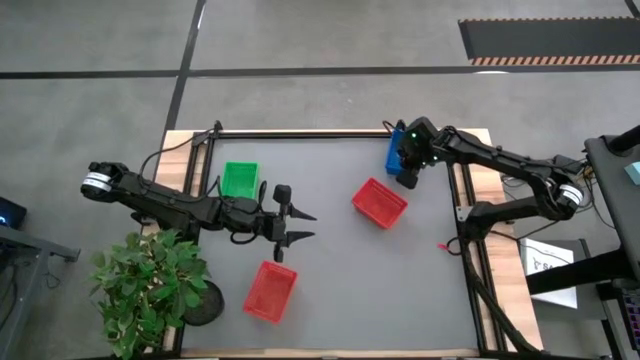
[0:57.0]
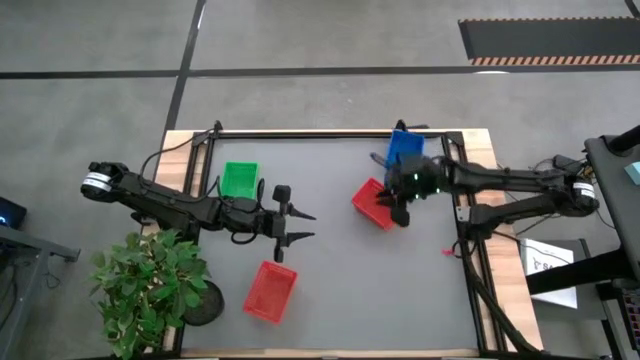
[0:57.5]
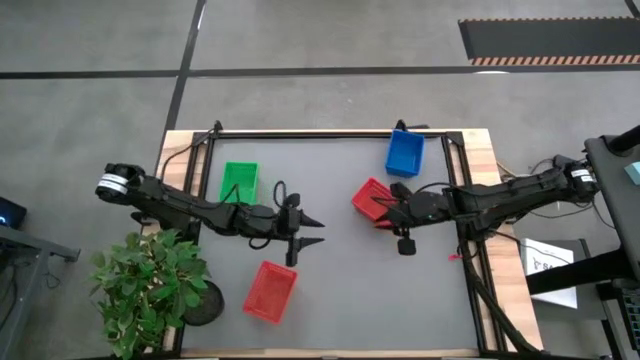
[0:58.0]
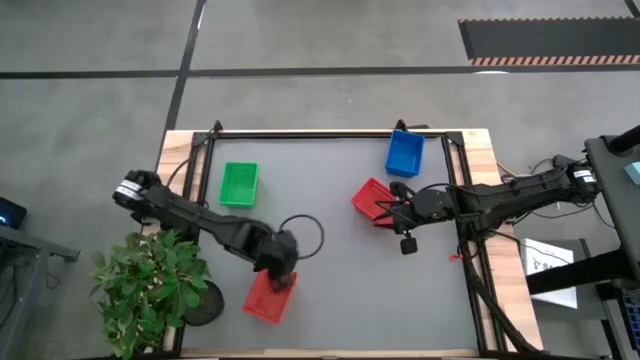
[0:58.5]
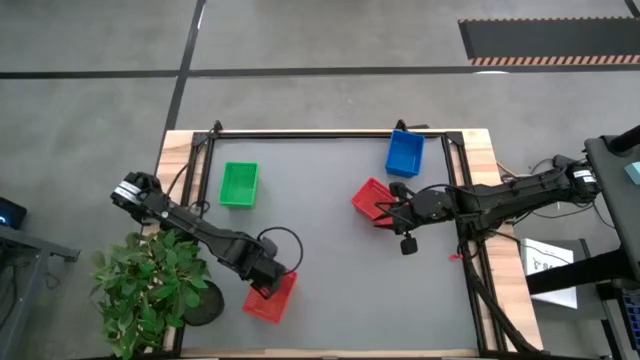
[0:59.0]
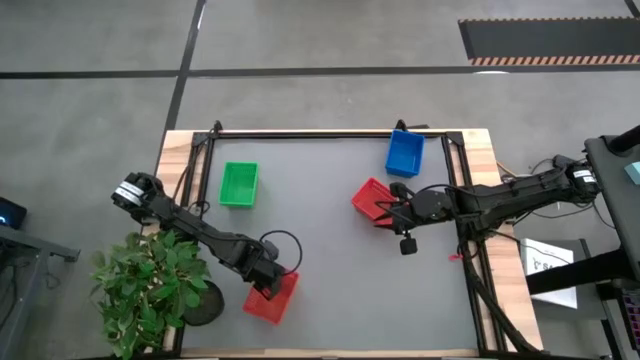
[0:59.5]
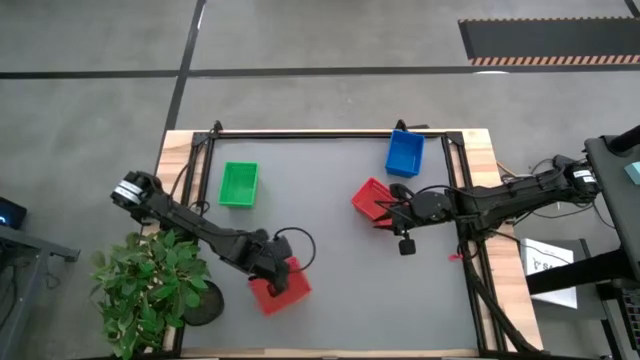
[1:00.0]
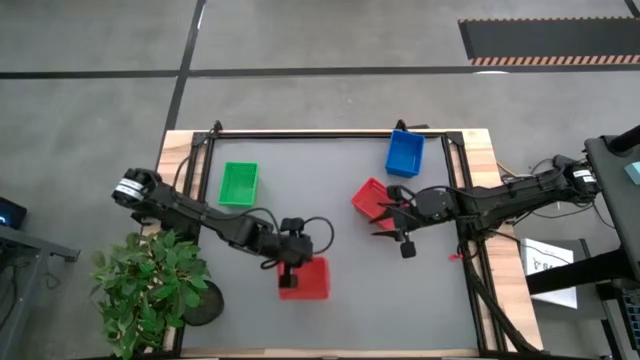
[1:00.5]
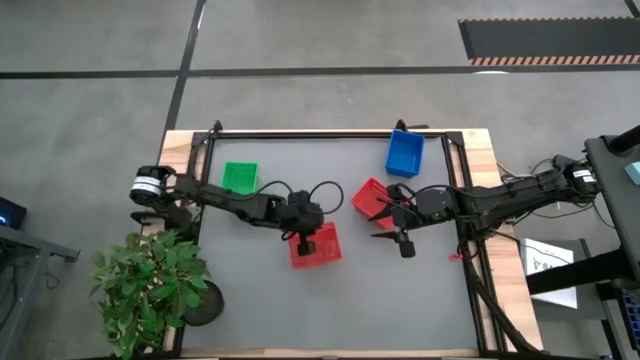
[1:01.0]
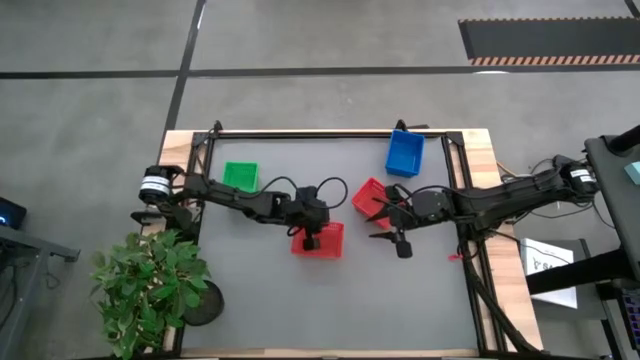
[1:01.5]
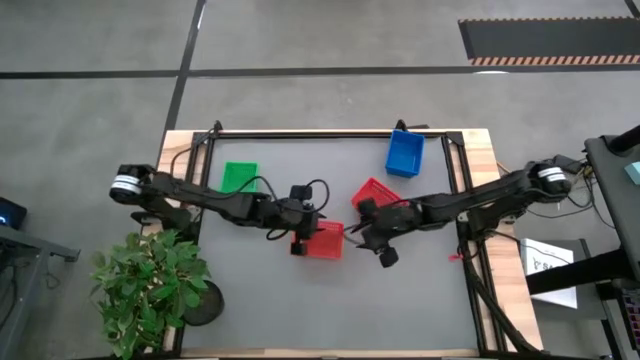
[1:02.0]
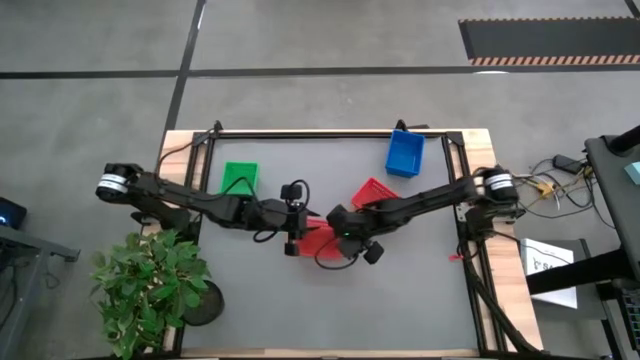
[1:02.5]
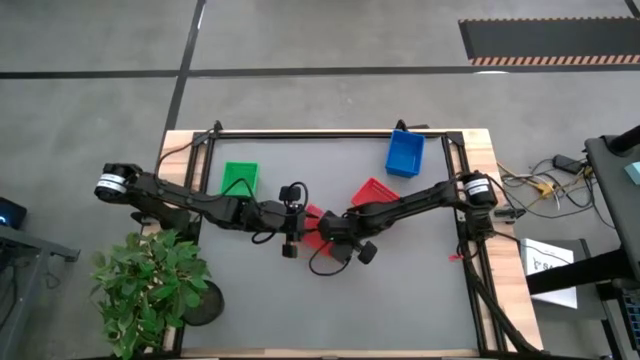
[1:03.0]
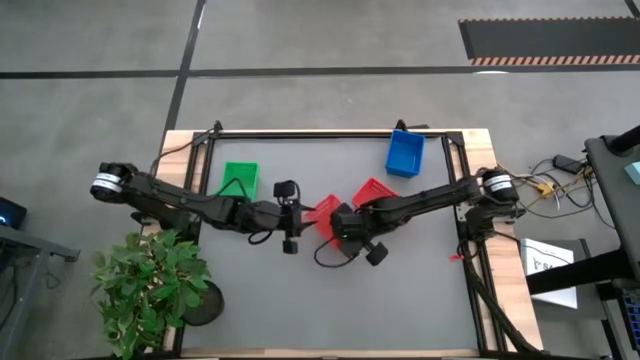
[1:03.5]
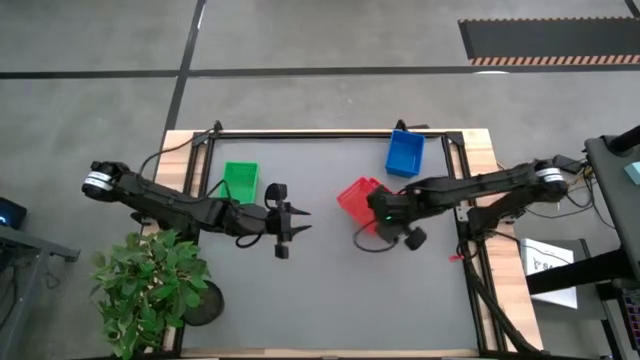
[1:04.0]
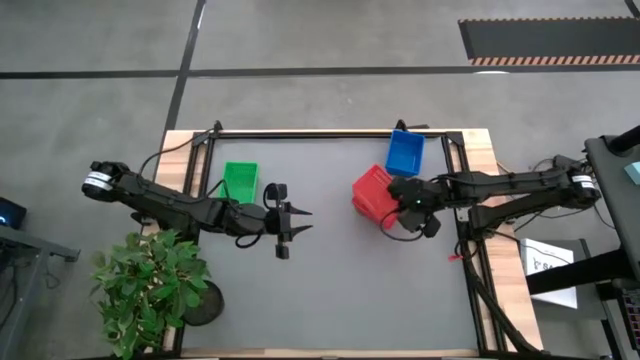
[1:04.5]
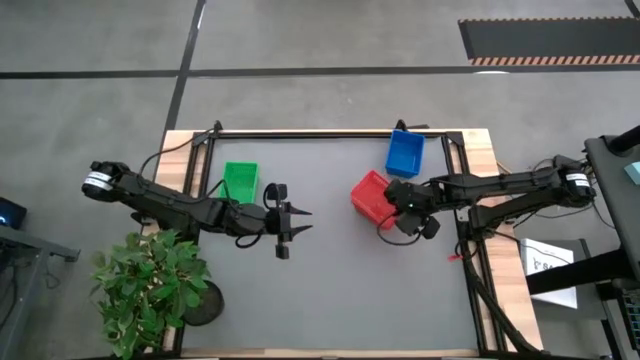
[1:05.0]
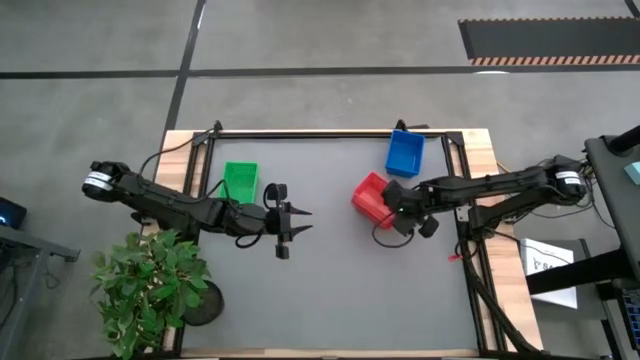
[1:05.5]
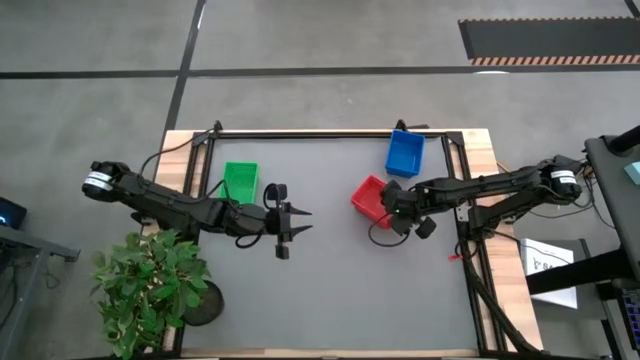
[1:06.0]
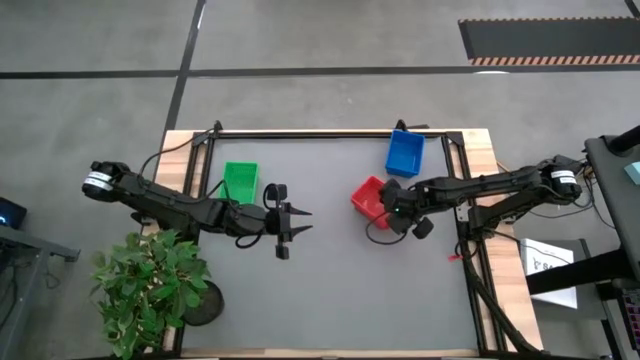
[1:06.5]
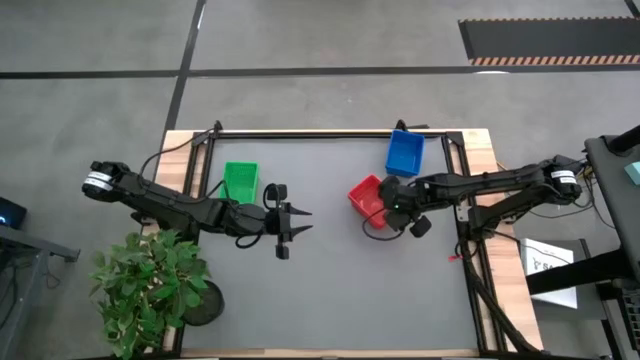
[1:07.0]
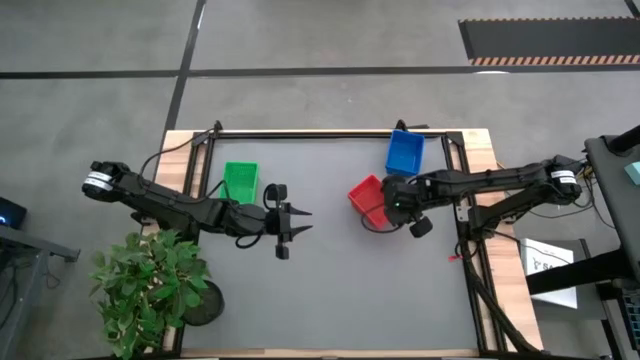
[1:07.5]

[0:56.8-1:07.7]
Stack the bottom red basket on the stacked red baskets

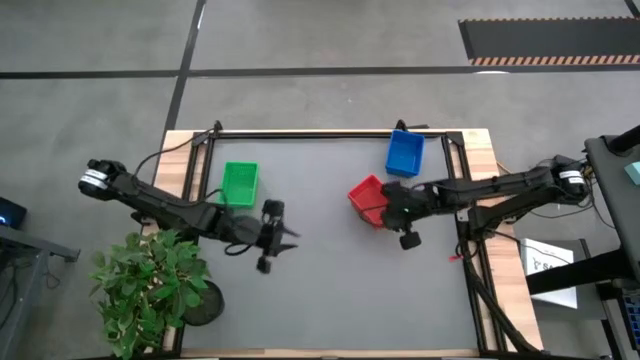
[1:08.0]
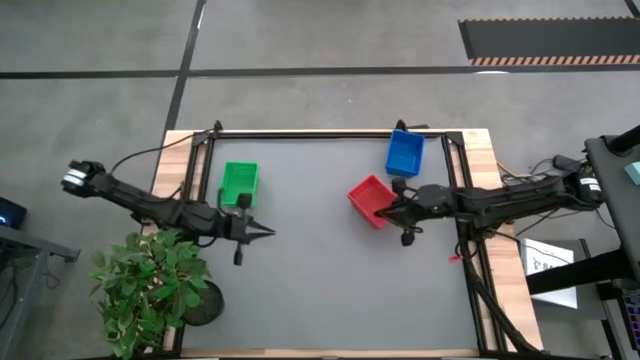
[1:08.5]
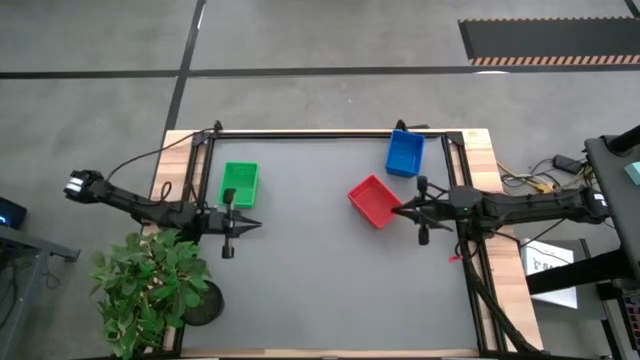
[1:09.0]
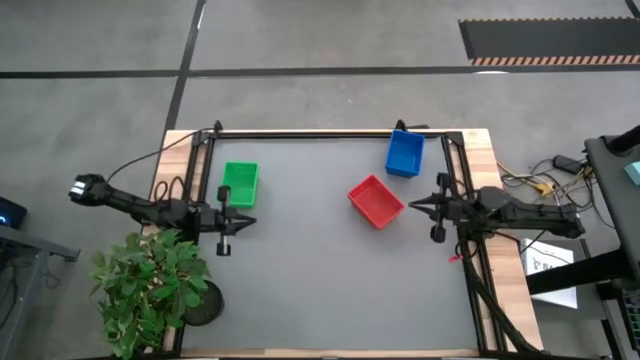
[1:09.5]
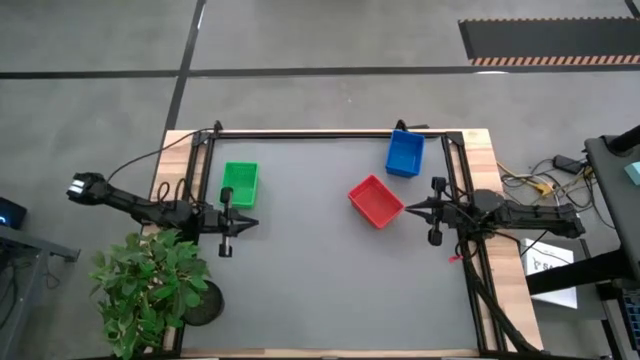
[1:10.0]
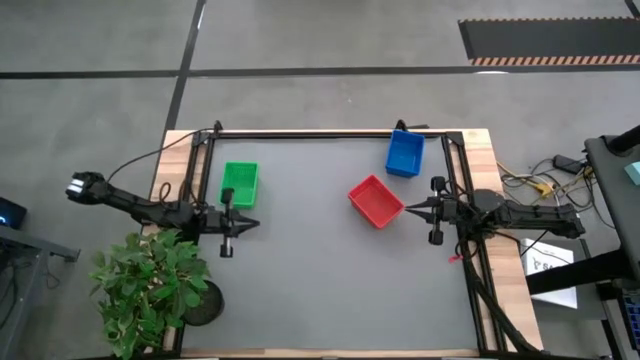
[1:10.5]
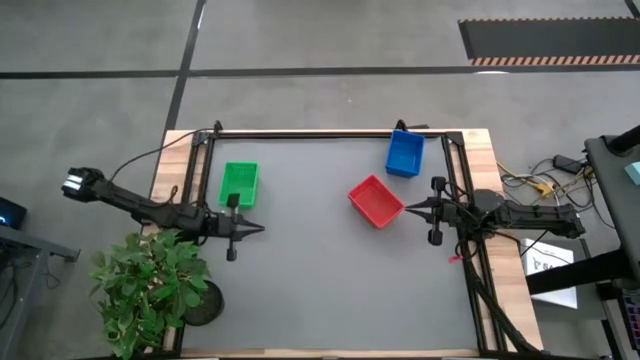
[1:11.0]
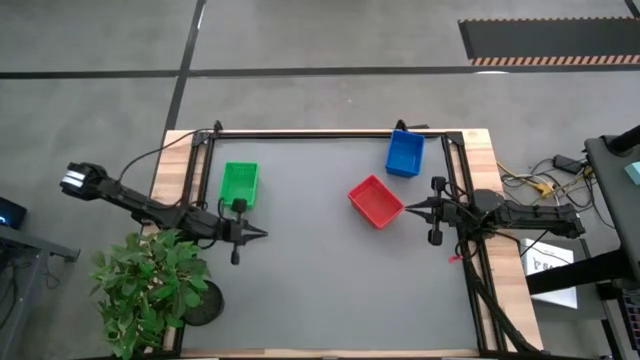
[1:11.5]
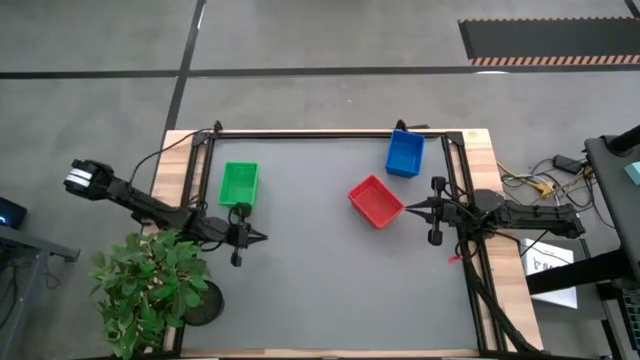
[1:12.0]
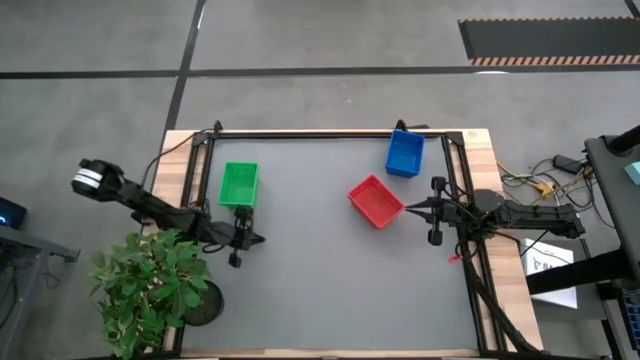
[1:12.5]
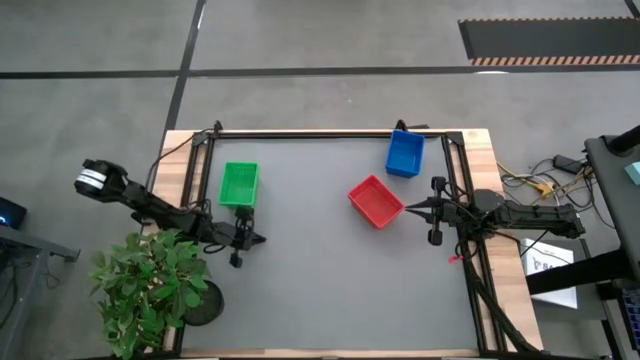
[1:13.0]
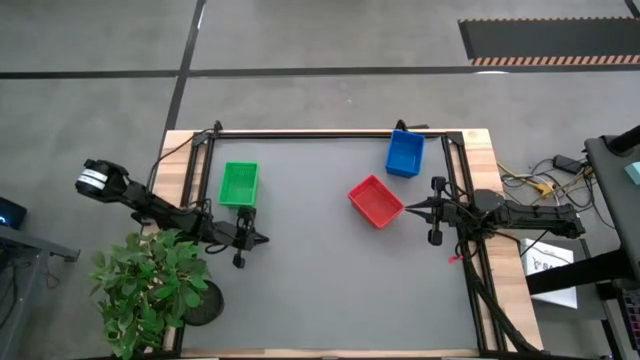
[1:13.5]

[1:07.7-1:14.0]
Return to Home Position

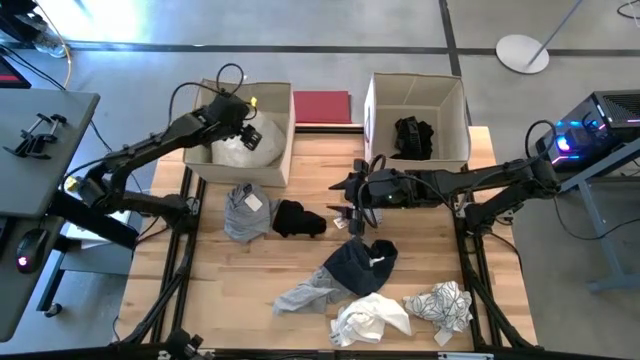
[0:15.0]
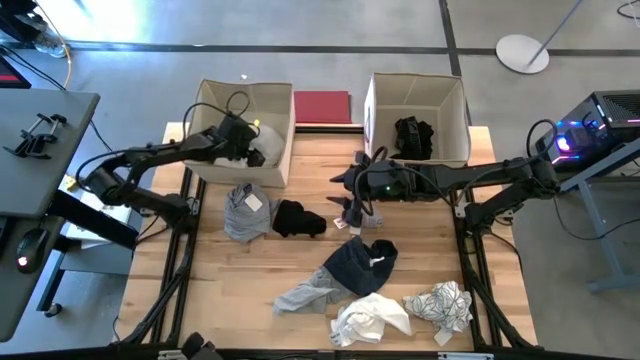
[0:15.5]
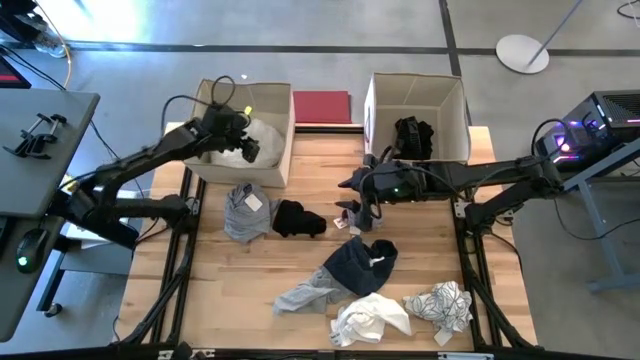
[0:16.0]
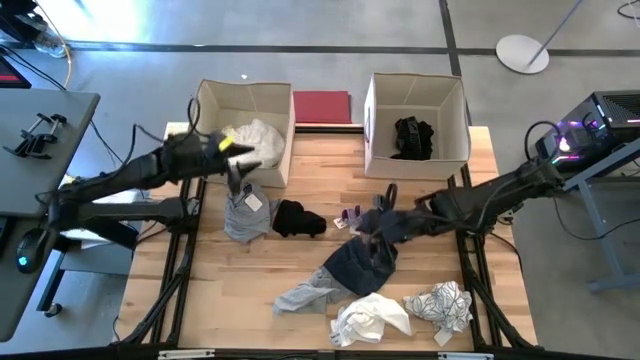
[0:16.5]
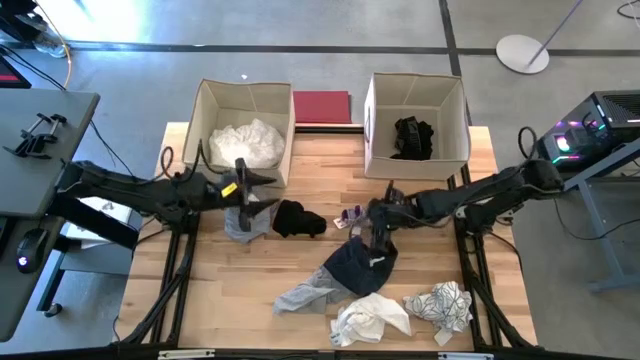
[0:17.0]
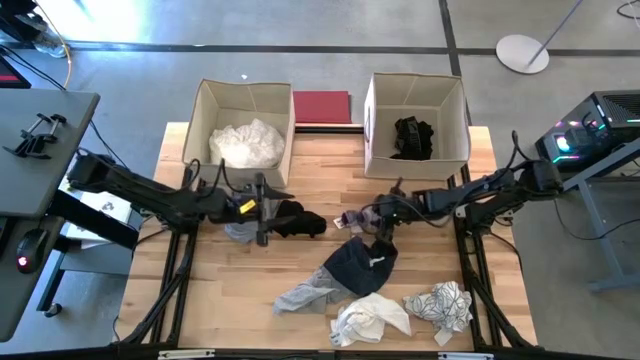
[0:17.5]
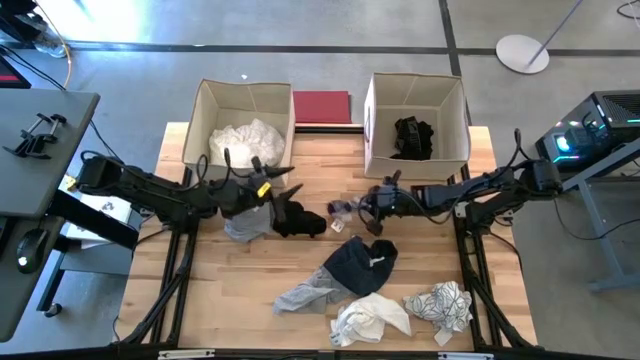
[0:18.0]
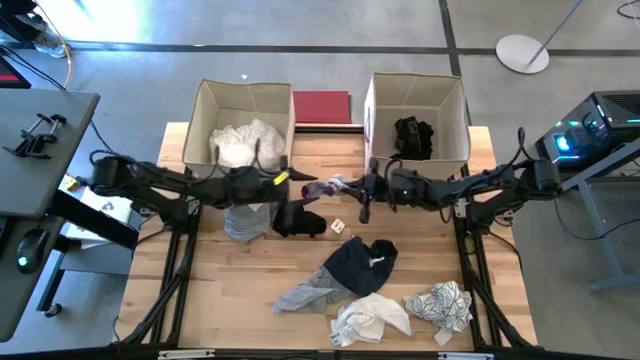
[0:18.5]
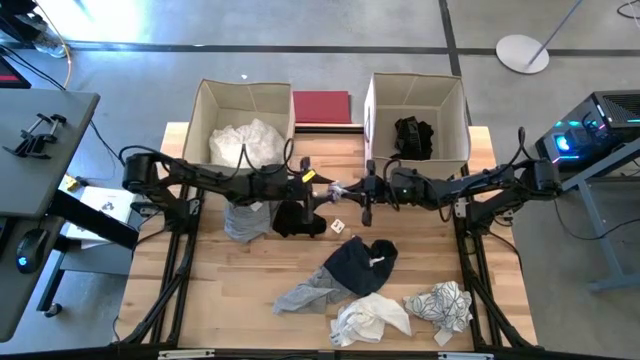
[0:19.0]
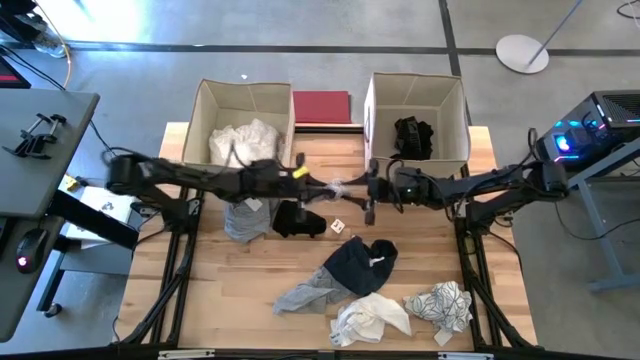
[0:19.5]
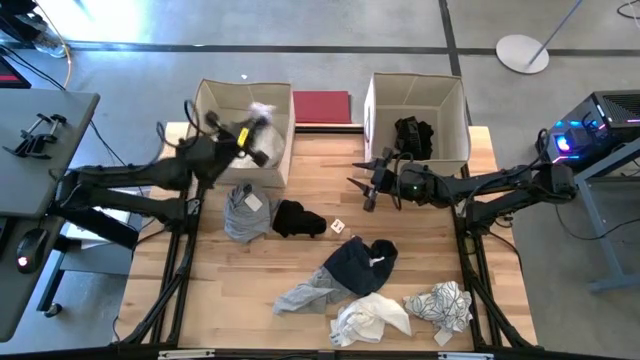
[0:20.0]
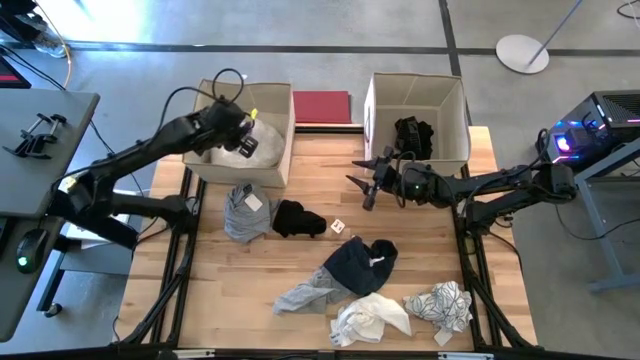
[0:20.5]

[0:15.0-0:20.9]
Put the gray socks into the left laundry organizer
